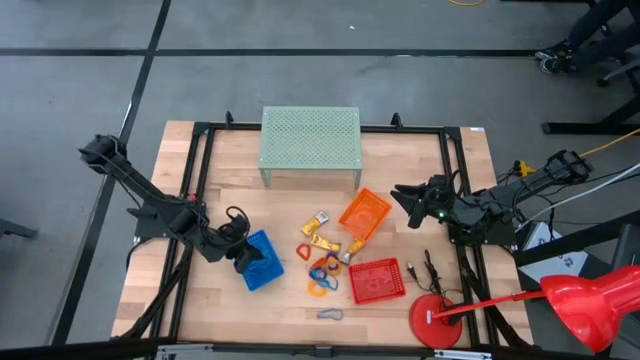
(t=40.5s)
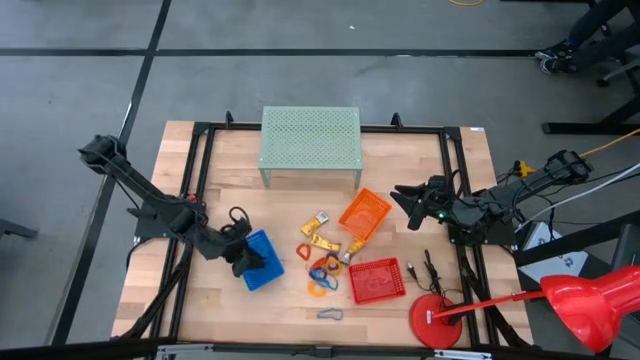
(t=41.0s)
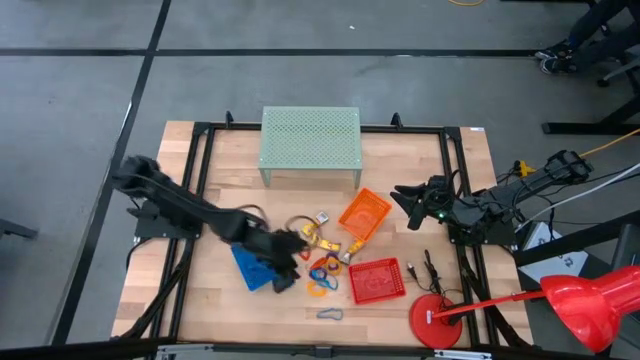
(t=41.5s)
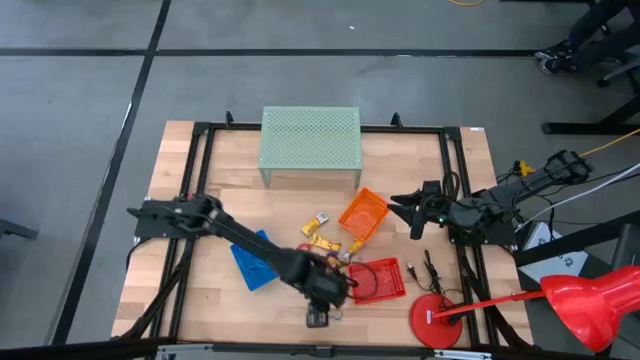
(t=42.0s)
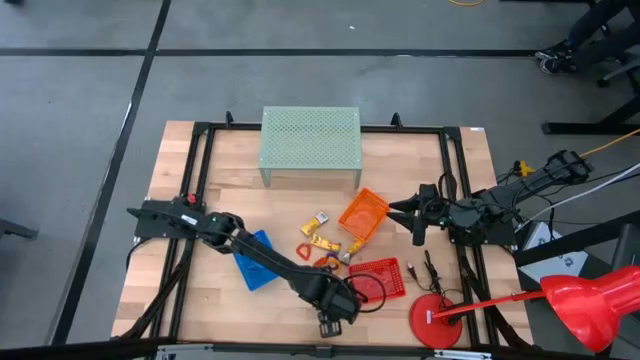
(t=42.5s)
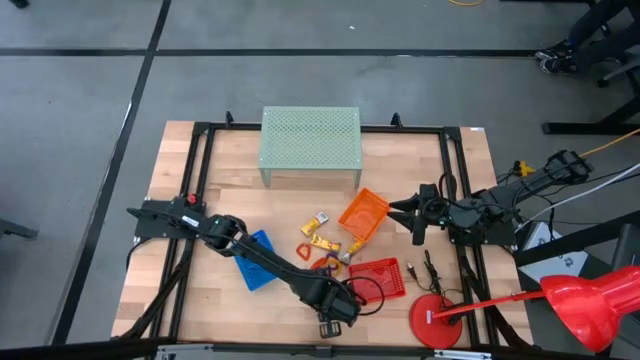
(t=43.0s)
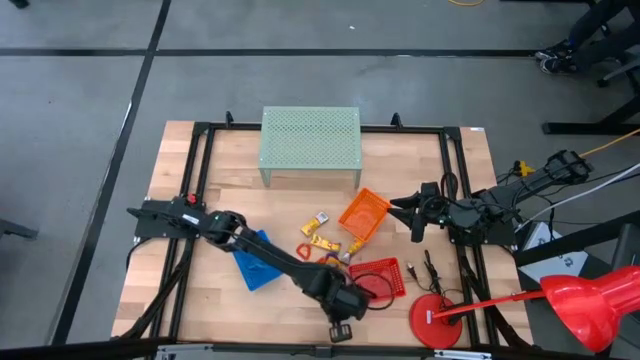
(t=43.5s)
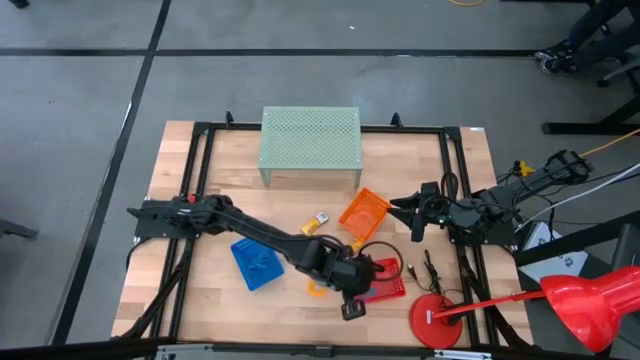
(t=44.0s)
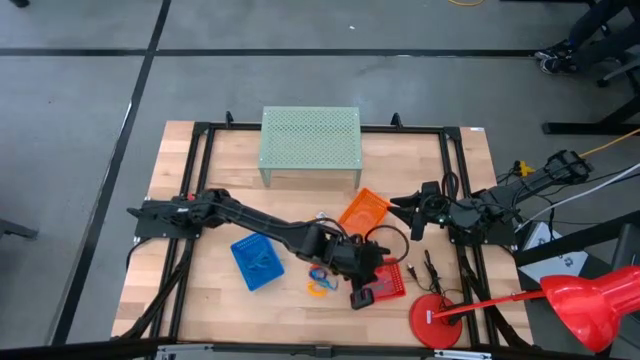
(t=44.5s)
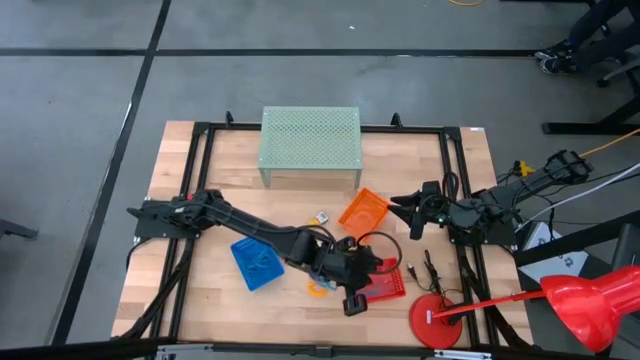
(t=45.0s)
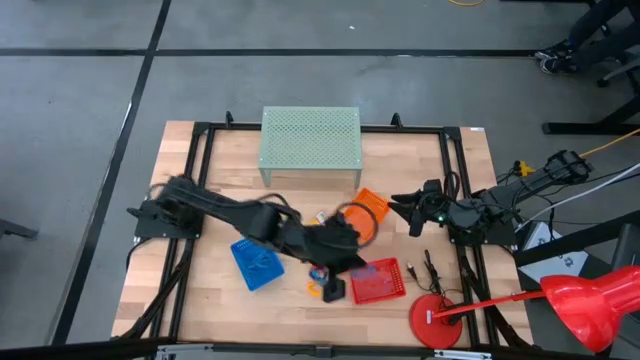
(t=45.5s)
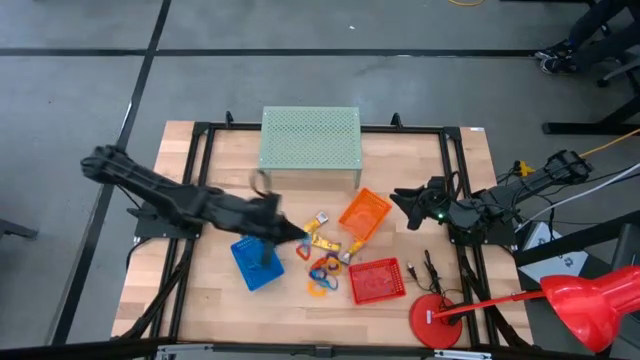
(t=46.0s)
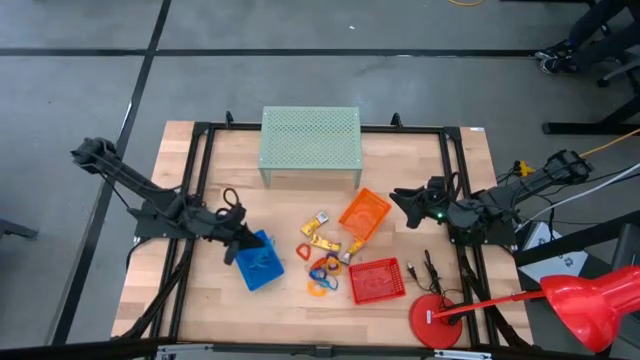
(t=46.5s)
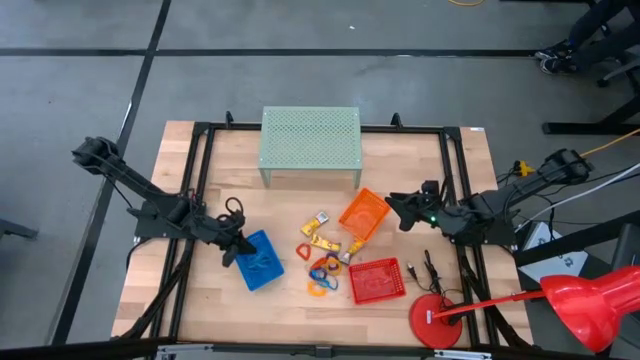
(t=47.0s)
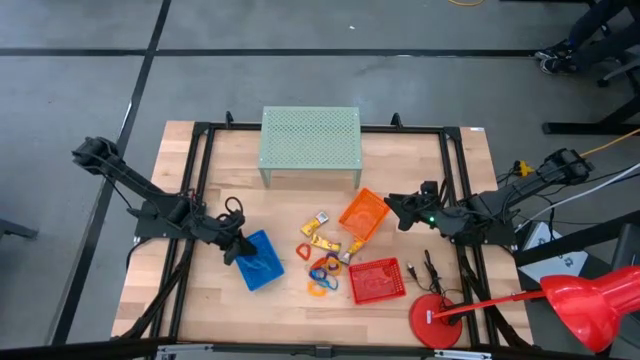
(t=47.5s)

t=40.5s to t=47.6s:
Task: Pick & Place Office Desk Supplies
Put the blue rubberband into the blue bin

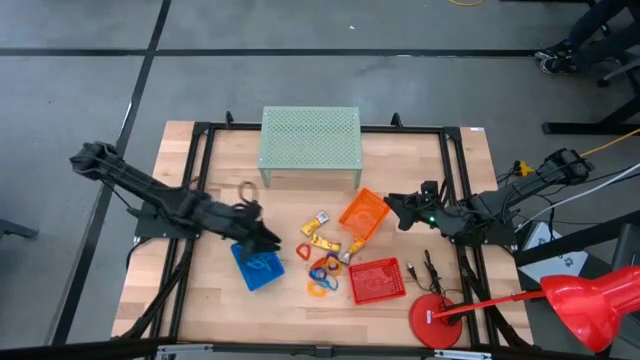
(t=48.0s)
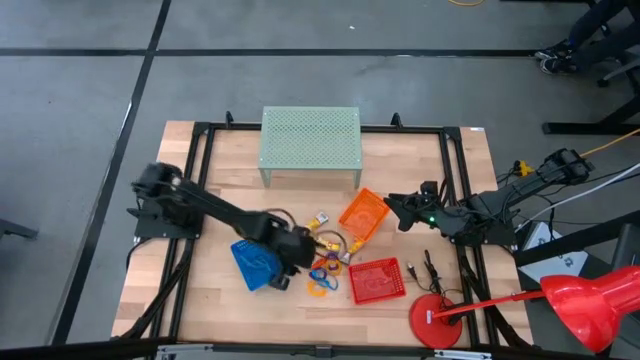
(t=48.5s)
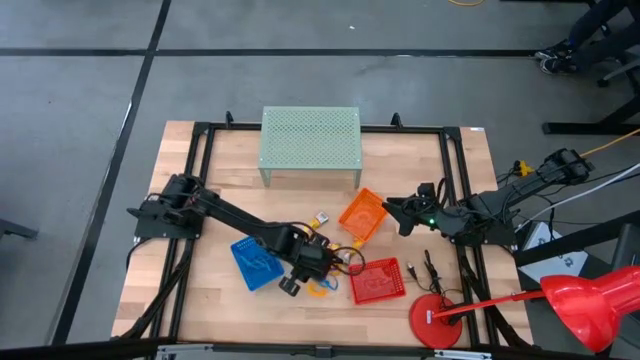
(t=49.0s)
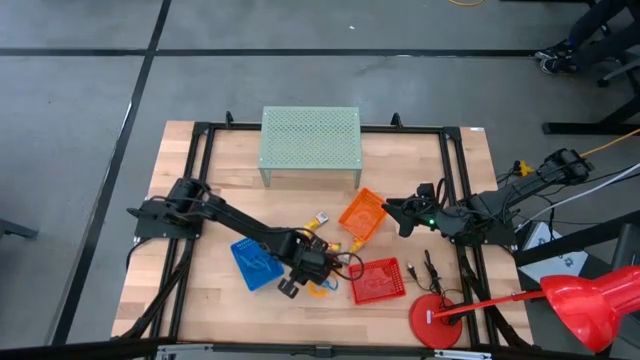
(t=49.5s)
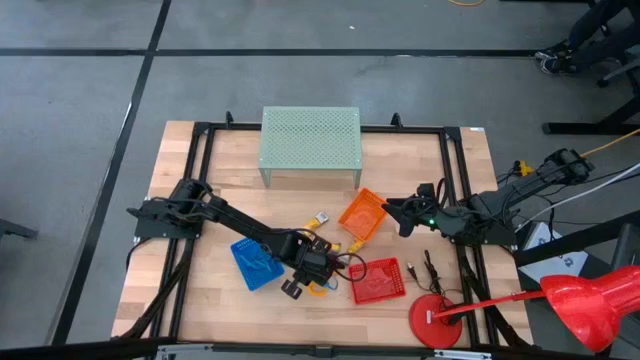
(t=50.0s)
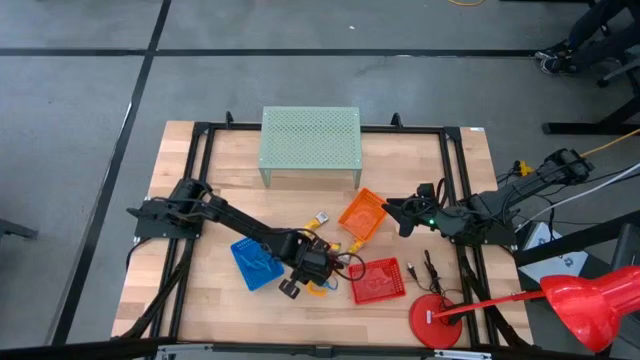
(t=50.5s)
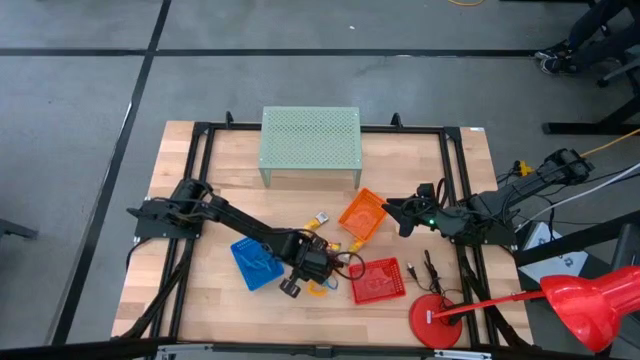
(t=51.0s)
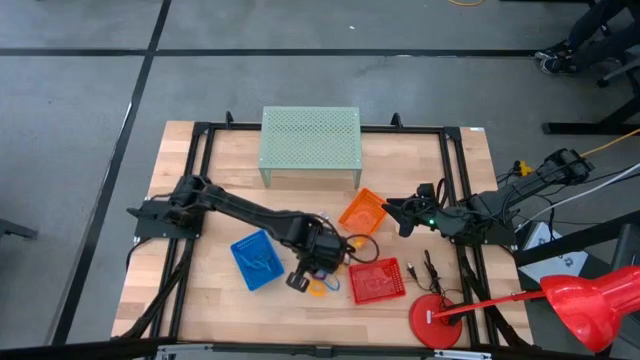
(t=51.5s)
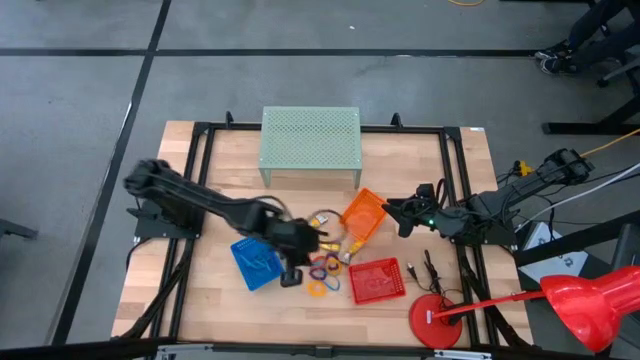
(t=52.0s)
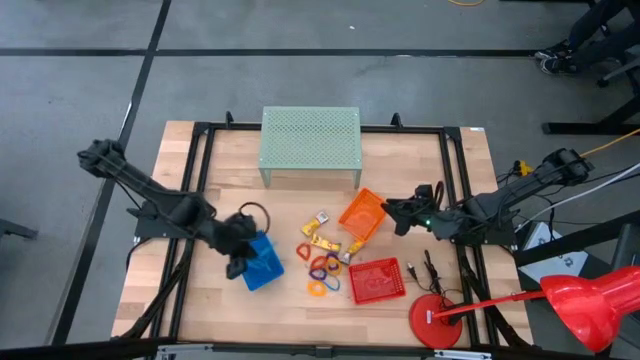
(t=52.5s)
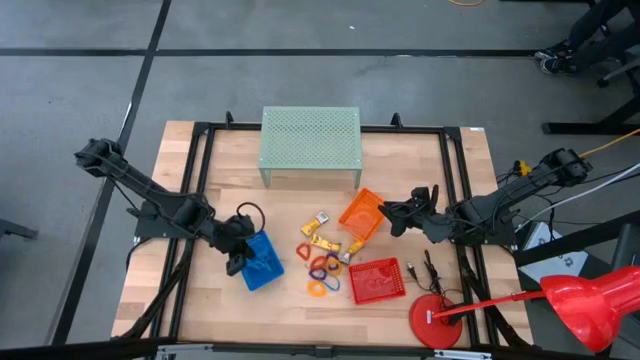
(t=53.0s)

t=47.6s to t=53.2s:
Put the blue rubberband into the blue bin

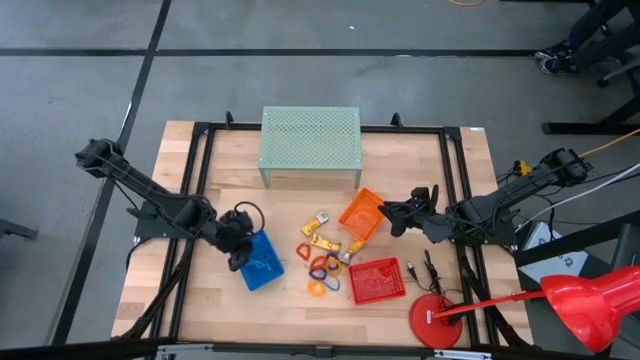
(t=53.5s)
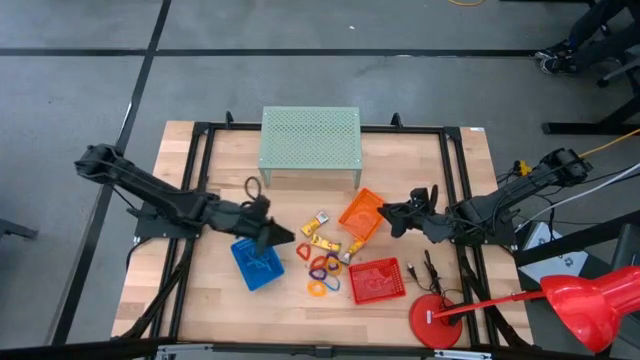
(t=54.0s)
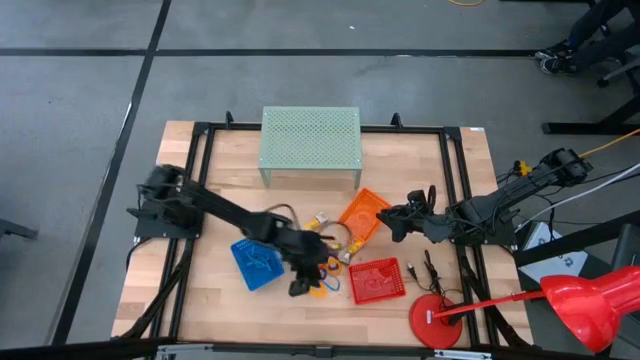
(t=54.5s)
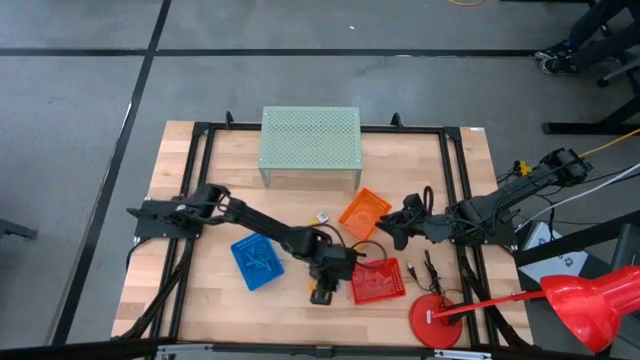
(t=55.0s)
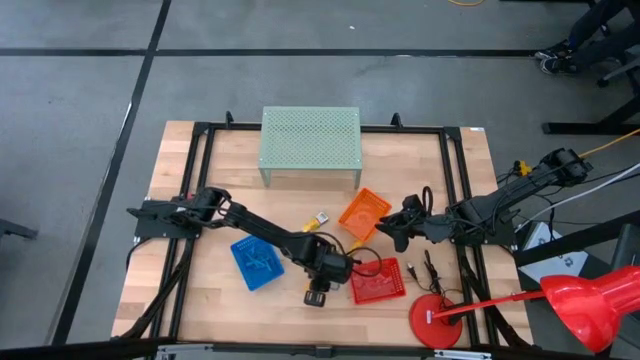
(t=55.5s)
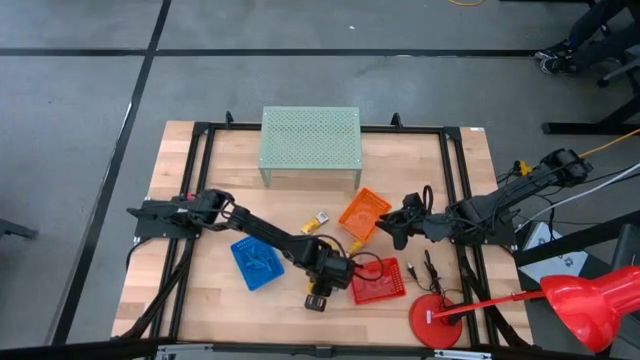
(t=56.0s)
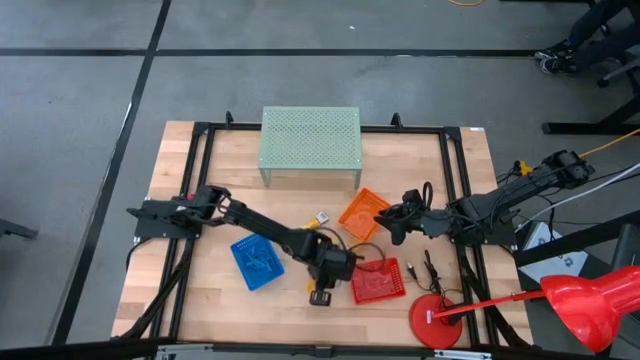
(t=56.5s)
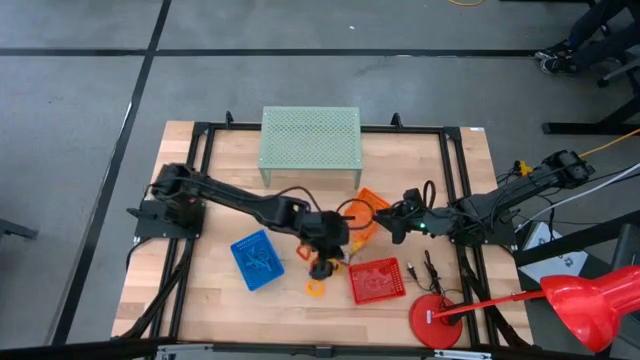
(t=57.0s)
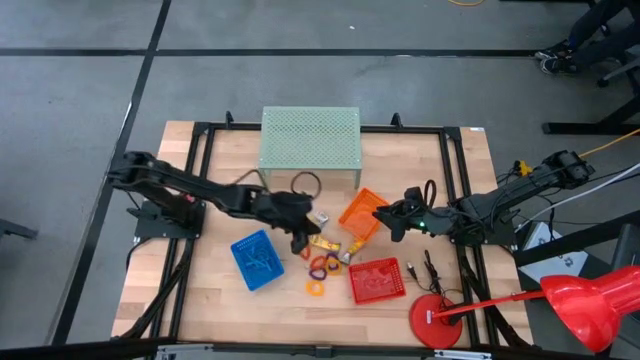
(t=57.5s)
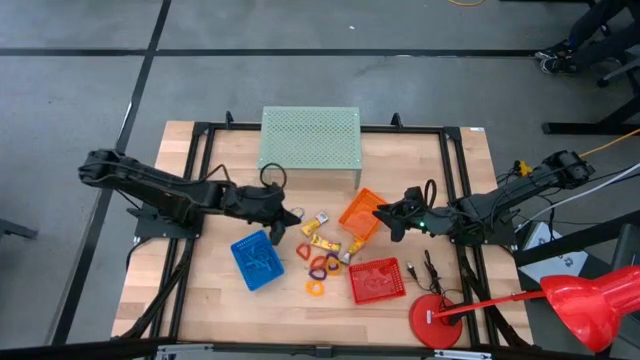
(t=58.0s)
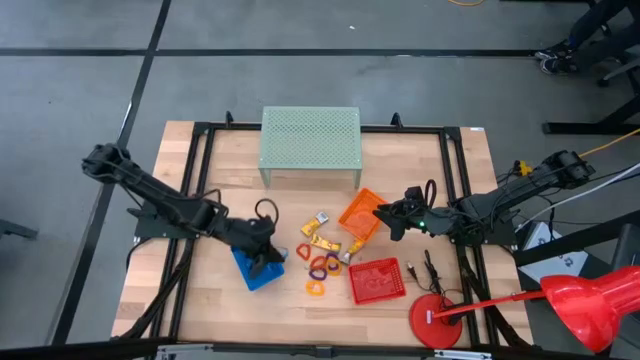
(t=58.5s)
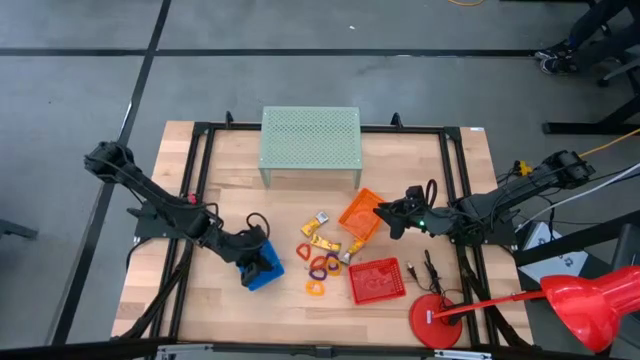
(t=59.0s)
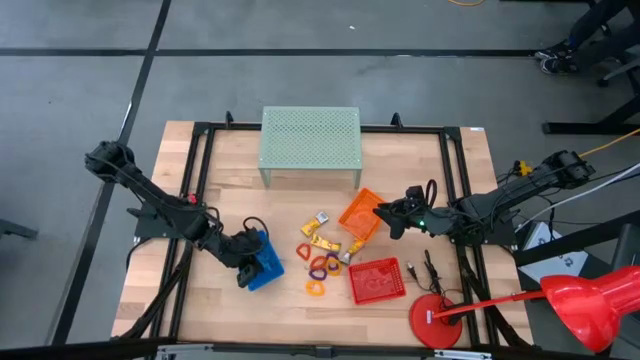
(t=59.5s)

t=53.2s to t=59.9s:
Put the blue rubberband into the blue bin

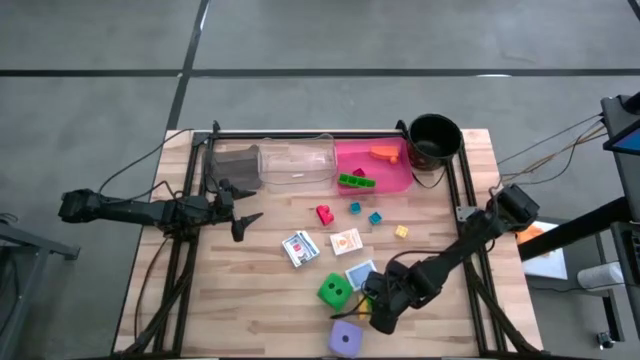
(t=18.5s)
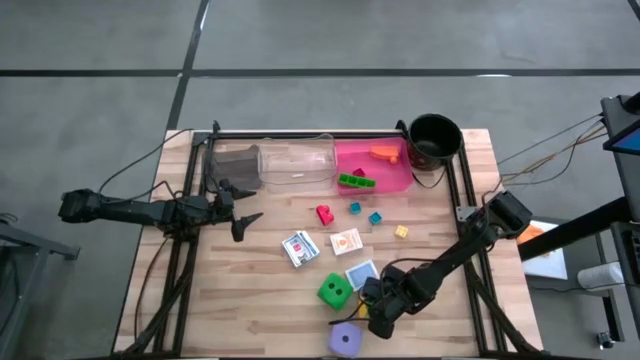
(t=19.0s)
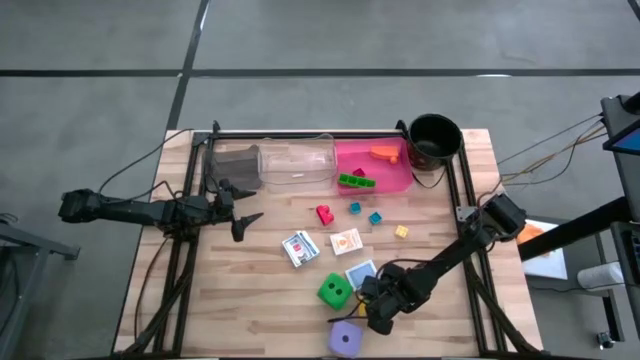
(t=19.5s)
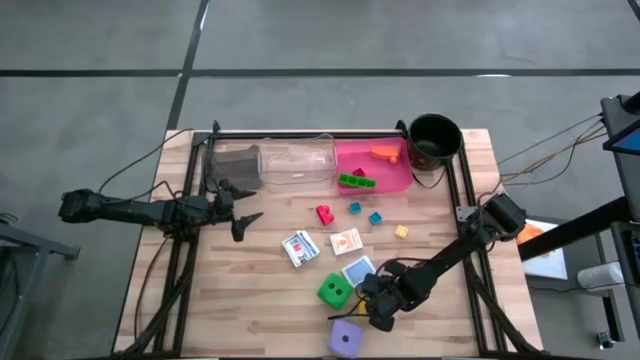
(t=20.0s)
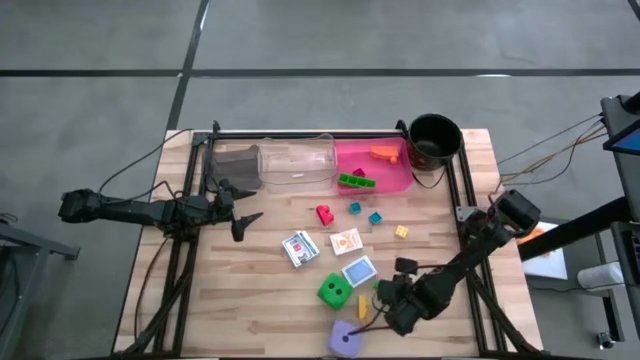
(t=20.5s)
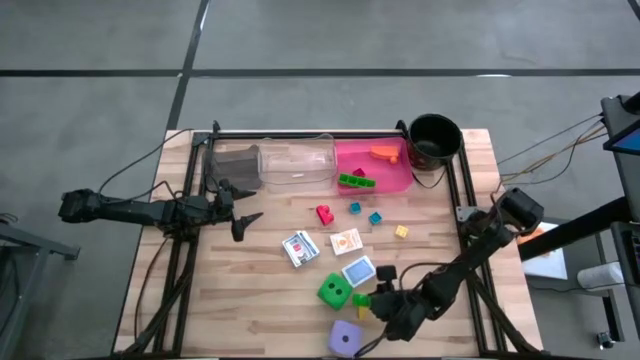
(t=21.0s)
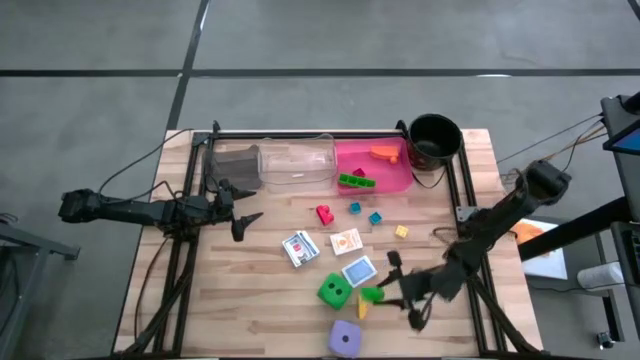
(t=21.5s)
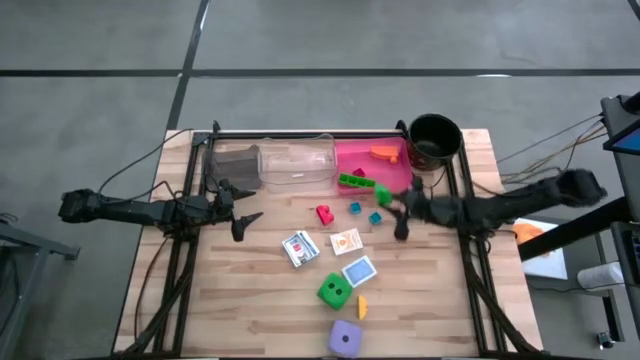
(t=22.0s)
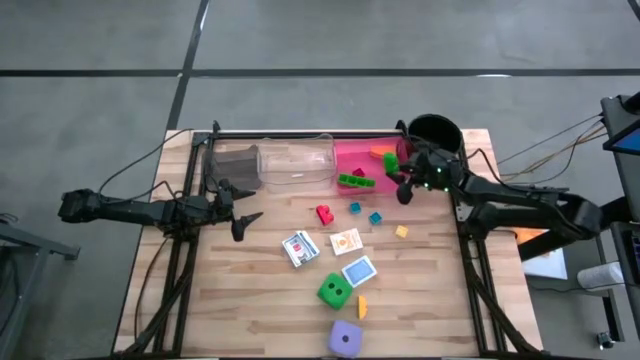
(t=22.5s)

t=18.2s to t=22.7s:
Task: Pick & Place Toys
Put the green game piece into the pink bin
